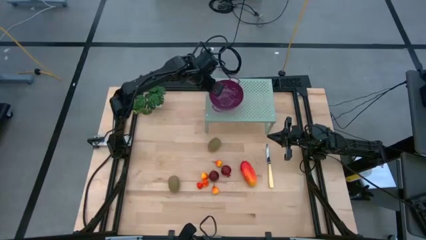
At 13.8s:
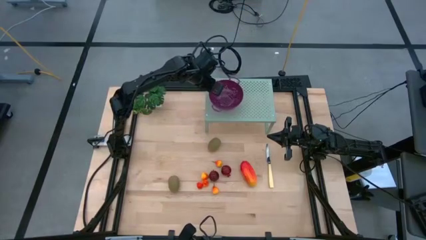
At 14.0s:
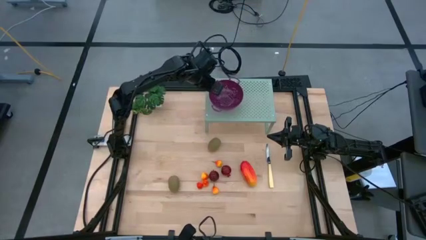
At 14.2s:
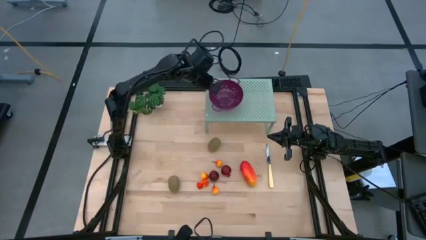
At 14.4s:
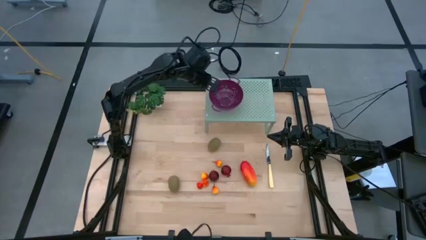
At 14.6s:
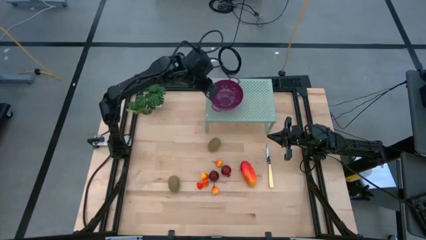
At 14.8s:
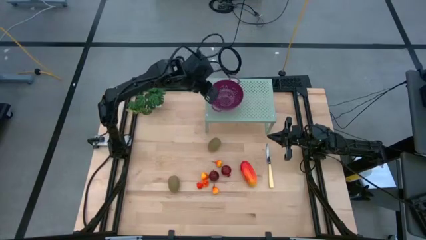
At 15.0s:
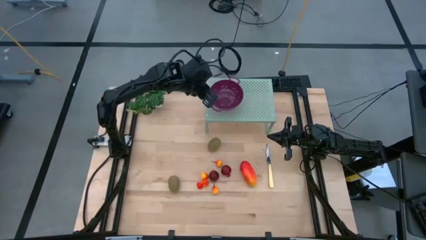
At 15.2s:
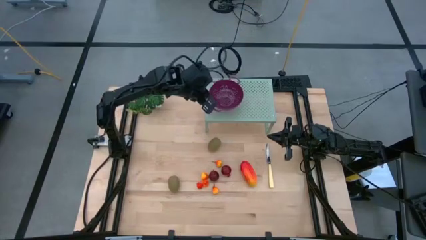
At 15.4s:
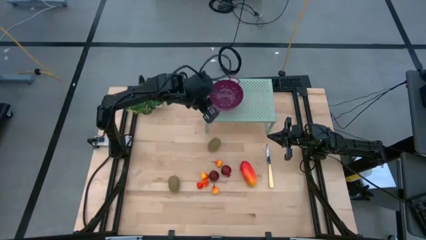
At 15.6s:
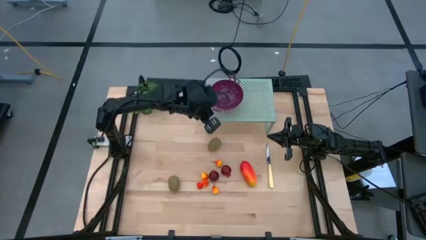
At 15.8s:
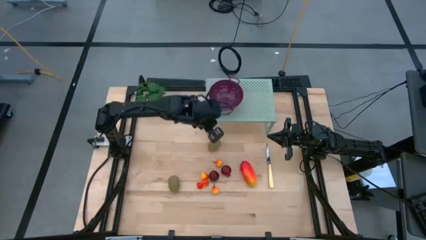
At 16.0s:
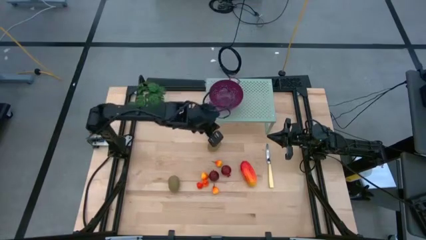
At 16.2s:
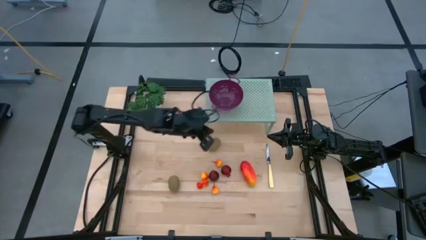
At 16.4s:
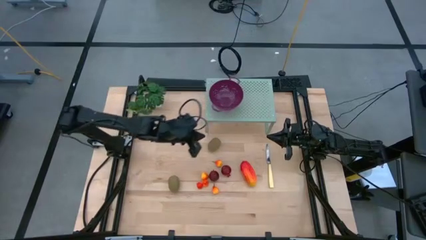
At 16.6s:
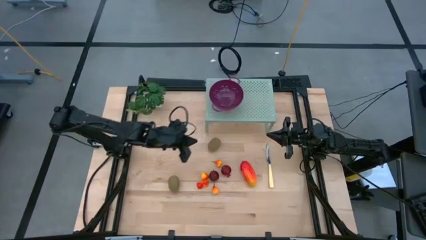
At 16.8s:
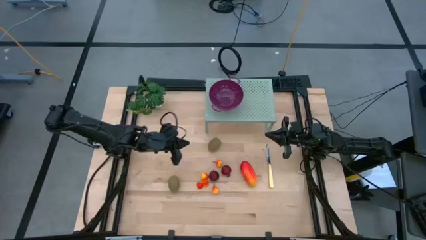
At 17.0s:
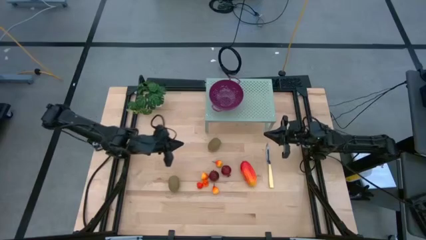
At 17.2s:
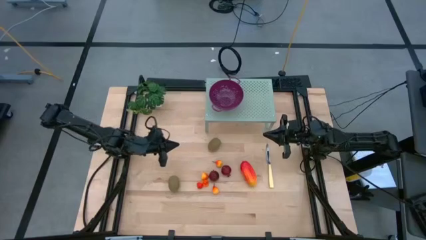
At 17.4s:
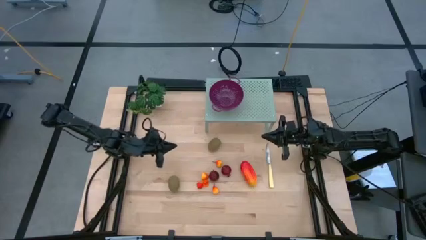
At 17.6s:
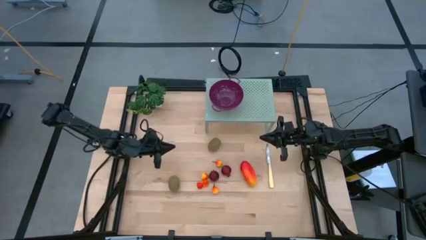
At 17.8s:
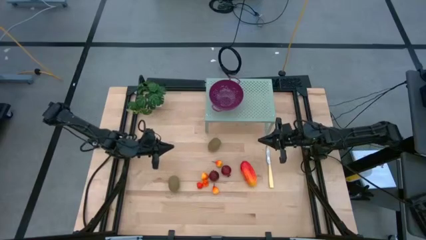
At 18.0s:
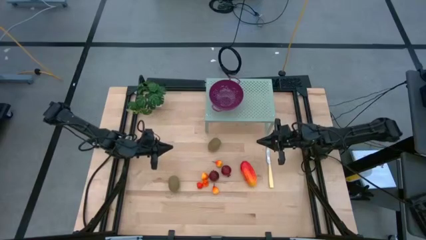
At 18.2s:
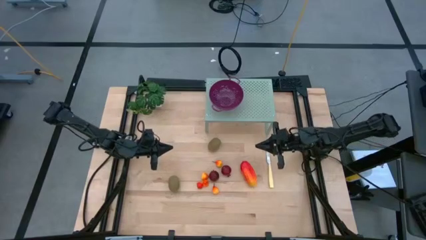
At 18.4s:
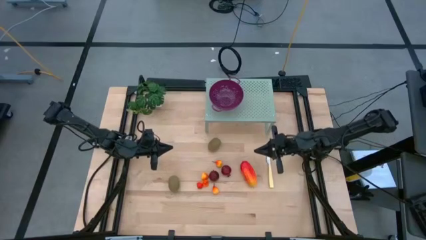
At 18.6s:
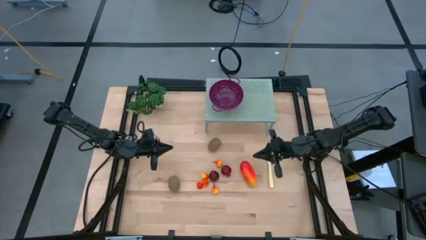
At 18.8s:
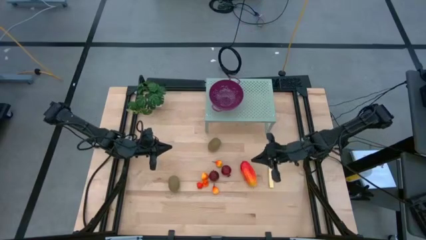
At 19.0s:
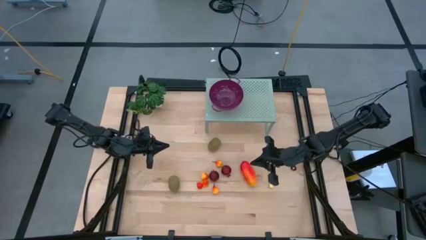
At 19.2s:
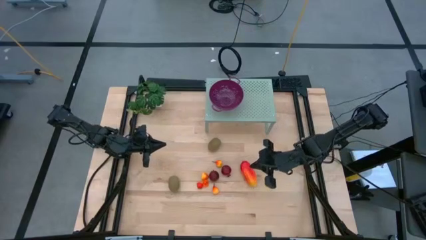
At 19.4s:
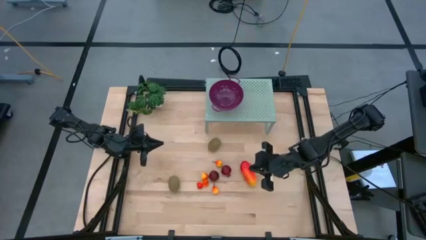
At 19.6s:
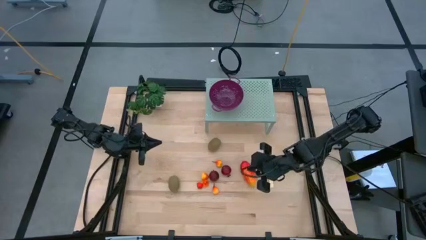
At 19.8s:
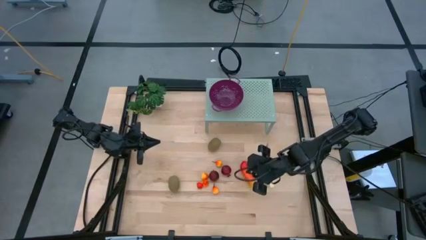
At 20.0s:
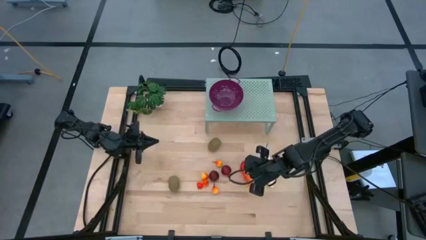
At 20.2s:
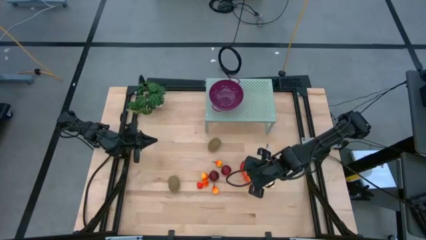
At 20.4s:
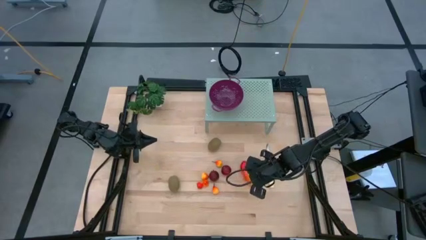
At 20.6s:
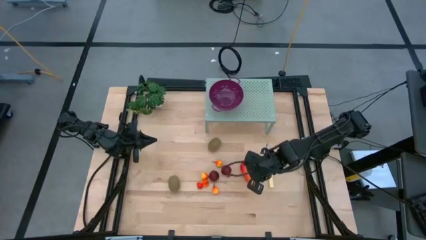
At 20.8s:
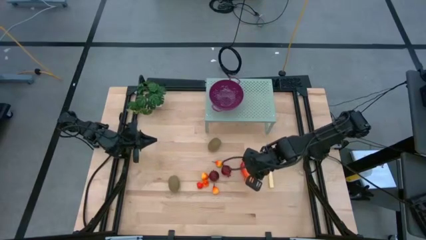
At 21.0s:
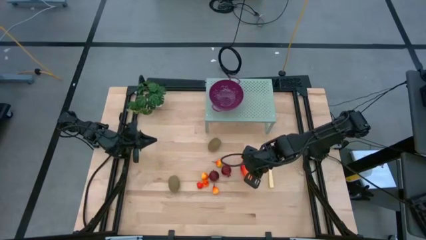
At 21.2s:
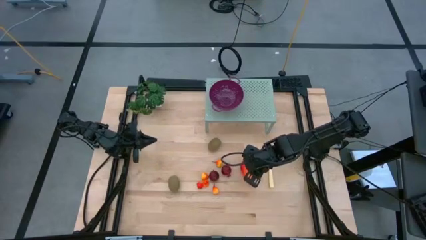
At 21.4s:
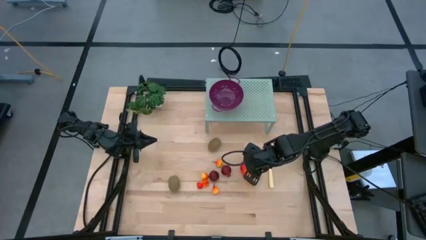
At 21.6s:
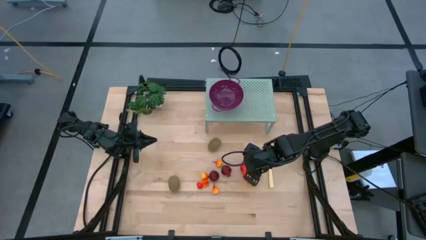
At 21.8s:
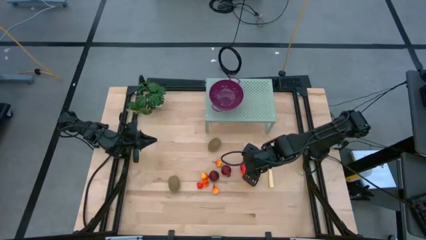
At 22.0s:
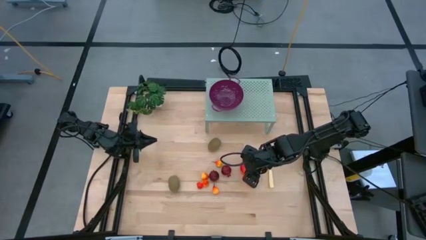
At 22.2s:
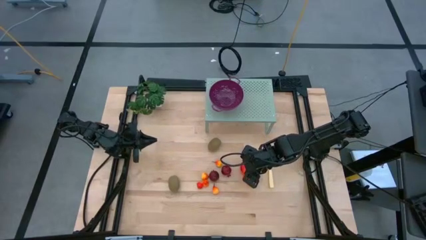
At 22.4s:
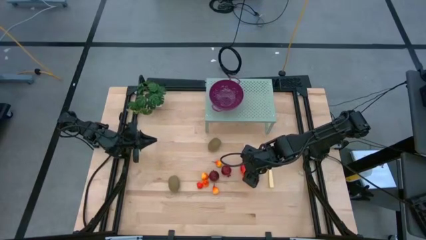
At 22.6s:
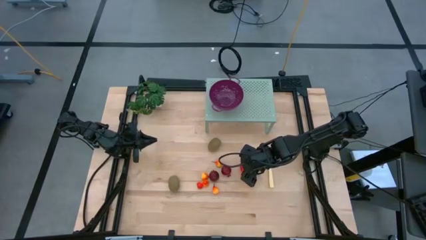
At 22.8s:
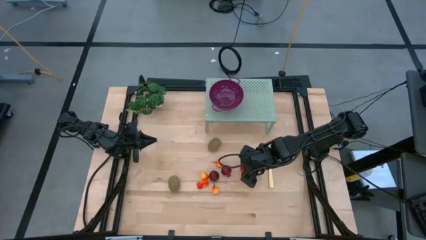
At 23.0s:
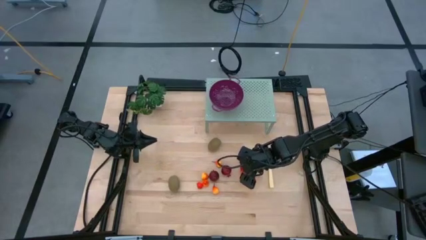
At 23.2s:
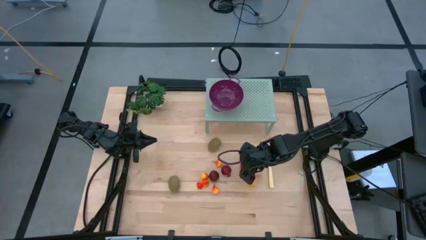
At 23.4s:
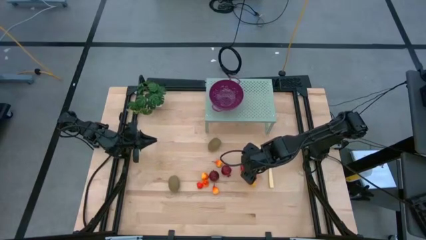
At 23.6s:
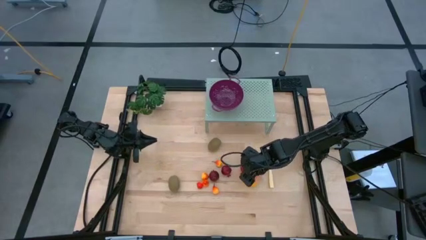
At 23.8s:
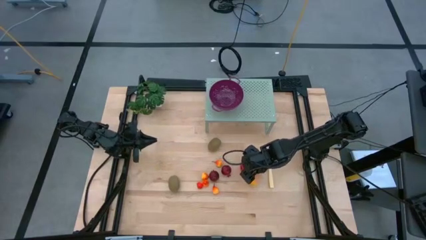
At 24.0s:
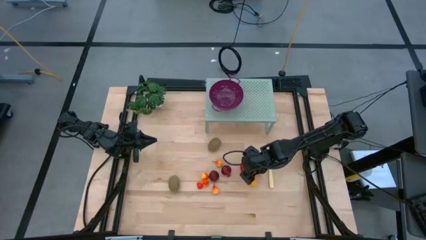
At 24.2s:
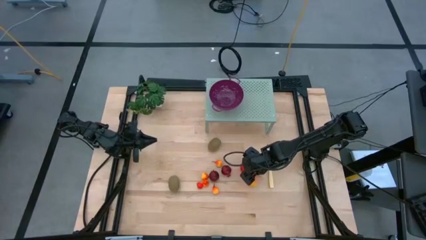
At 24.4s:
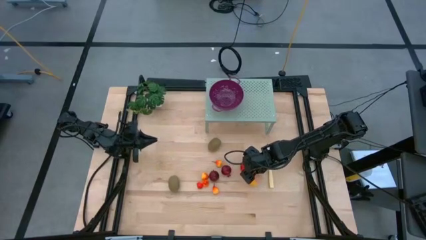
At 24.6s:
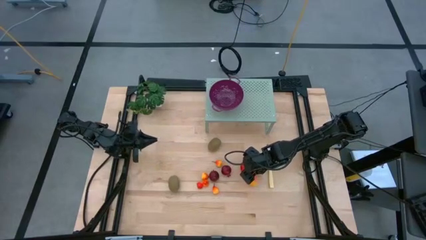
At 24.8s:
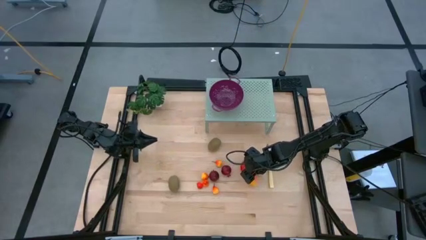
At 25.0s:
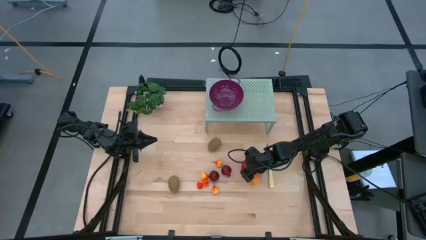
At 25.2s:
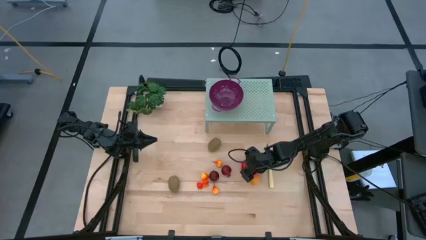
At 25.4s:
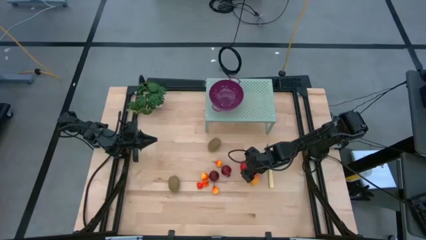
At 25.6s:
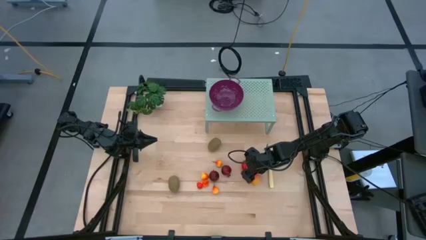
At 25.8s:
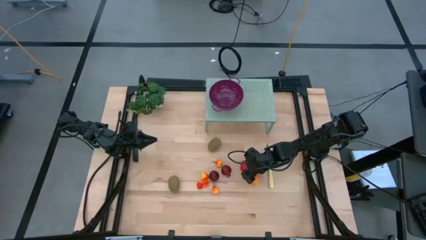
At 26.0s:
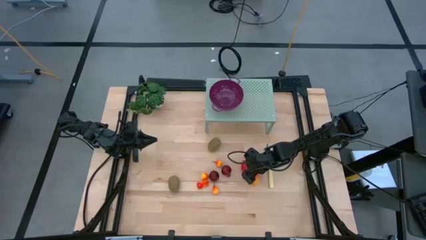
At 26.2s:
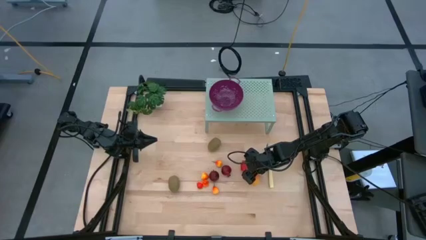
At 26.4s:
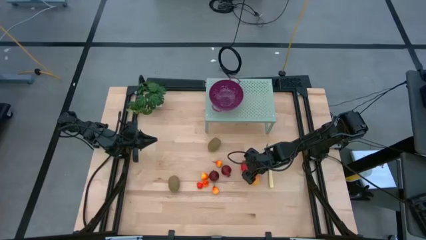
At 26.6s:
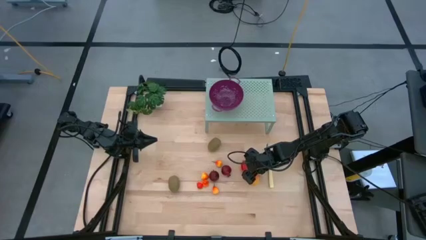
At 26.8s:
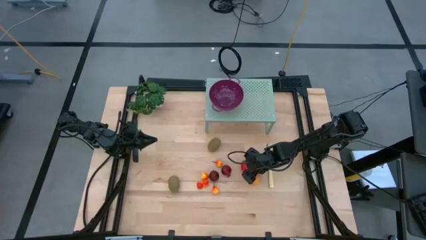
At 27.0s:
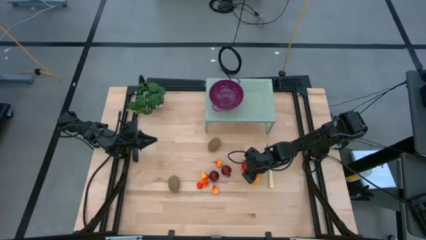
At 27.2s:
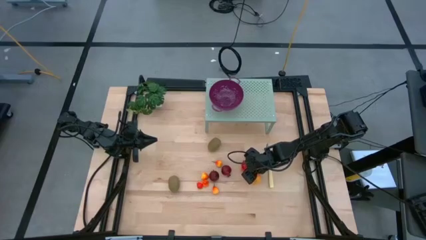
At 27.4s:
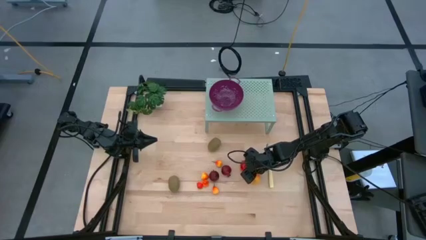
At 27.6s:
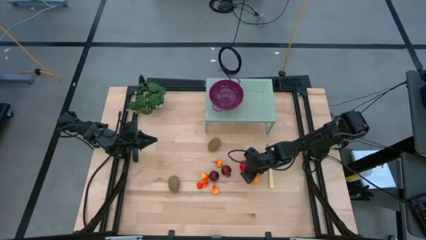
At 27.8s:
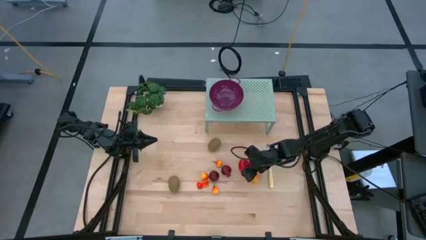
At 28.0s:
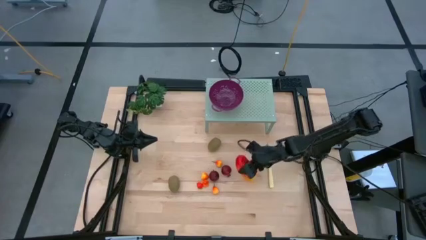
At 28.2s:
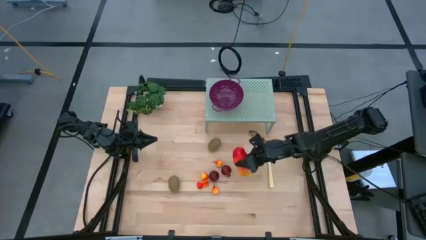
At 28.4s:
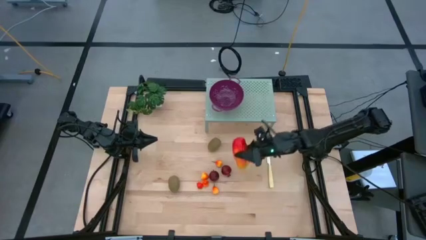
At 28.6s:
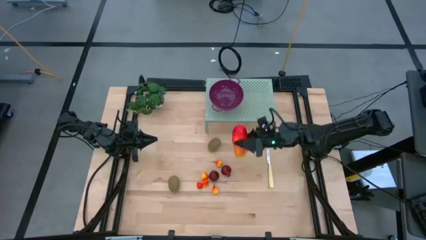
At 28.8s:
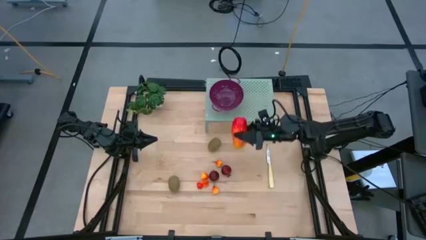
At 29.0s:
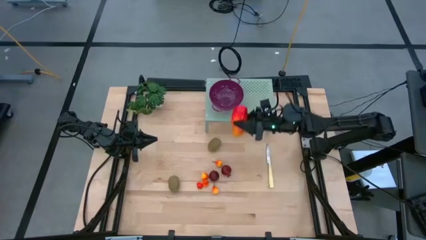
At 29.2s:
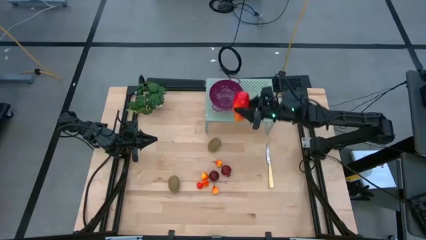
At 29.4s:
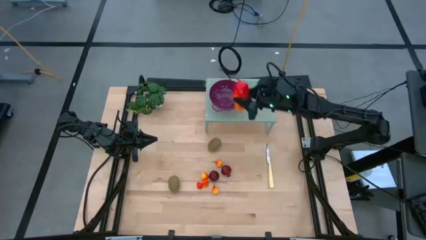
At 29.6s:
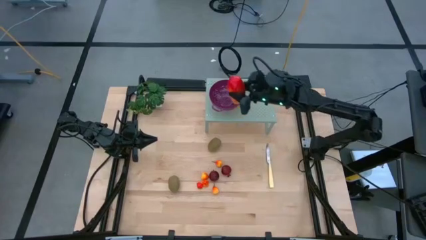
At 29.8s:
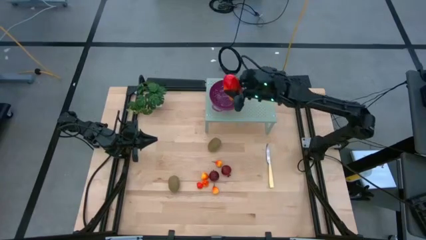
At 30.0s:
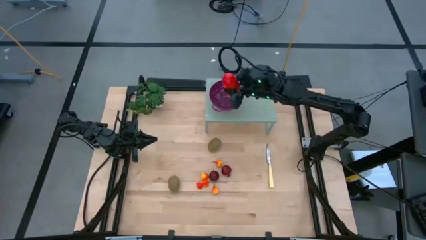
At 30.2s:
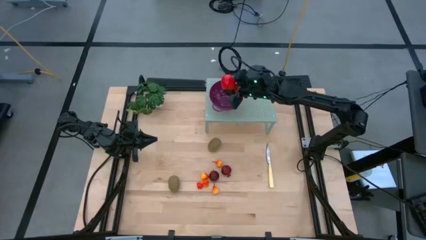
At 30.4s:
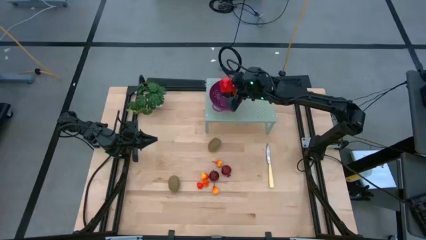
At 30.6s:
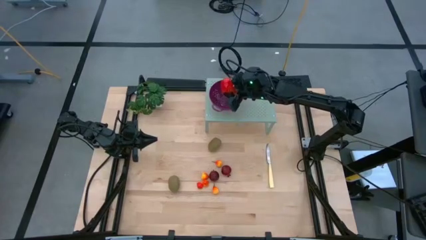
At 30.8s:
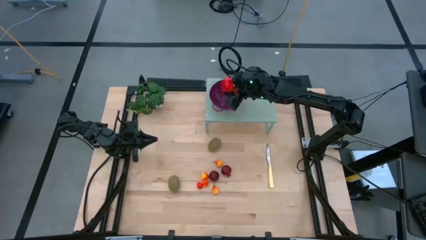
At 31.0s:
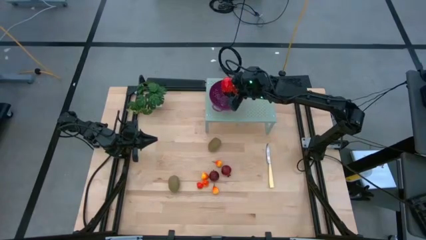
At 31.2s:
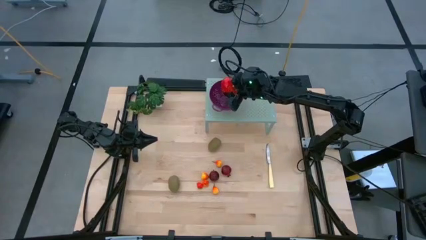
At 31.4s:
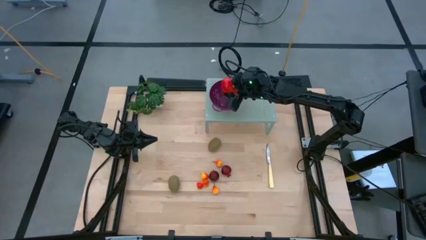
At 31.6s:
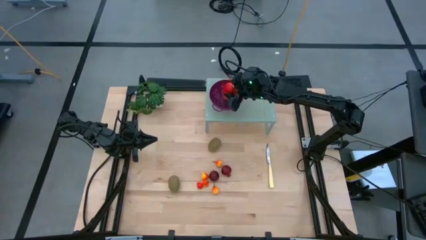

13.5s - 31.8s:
Task: Pick & Place Fruit
Put the mango into the dark red colander on the shelf
